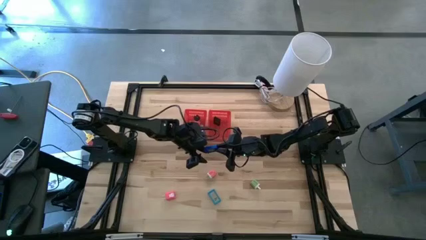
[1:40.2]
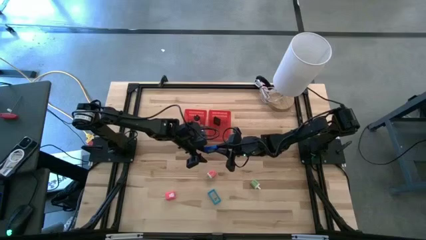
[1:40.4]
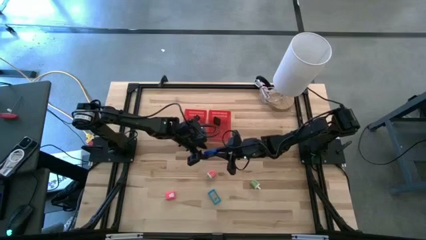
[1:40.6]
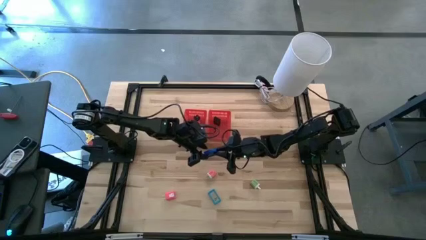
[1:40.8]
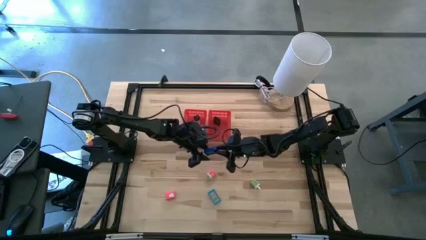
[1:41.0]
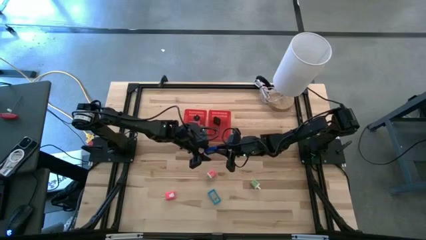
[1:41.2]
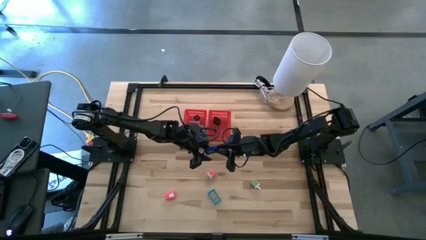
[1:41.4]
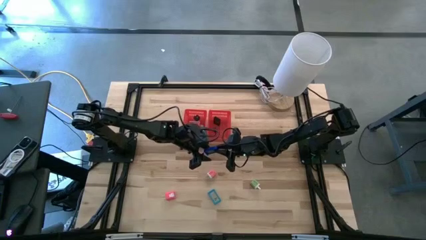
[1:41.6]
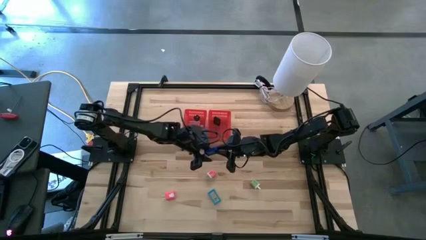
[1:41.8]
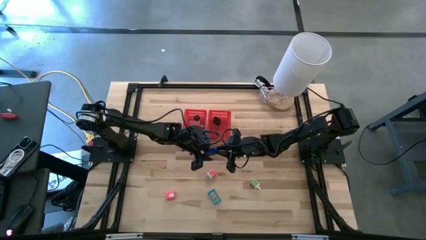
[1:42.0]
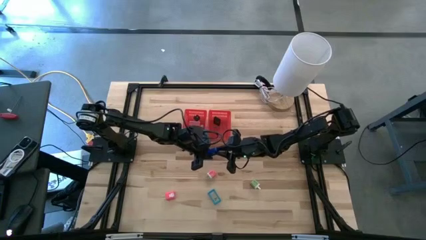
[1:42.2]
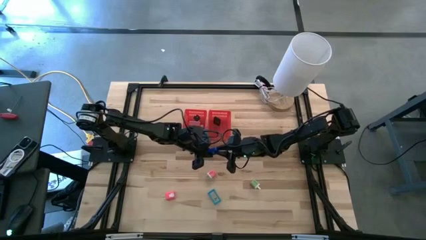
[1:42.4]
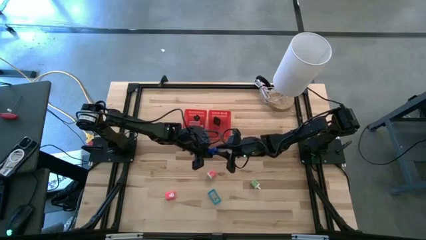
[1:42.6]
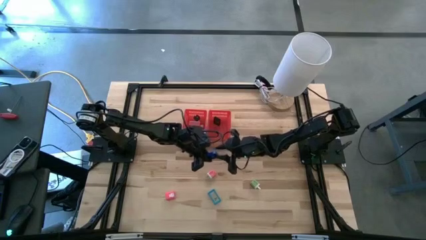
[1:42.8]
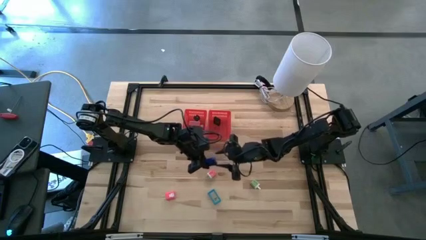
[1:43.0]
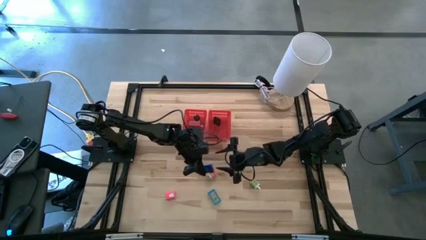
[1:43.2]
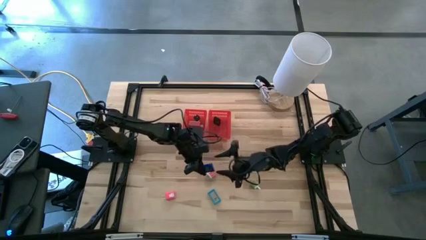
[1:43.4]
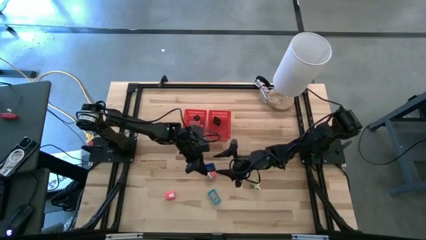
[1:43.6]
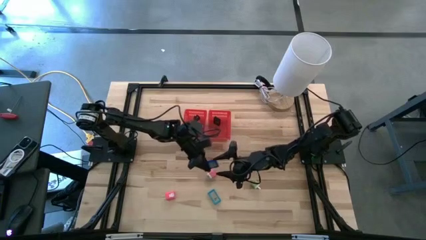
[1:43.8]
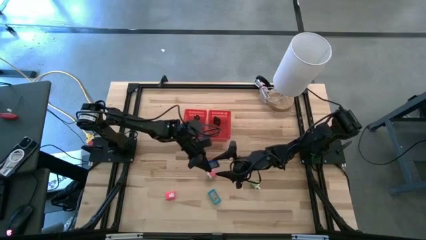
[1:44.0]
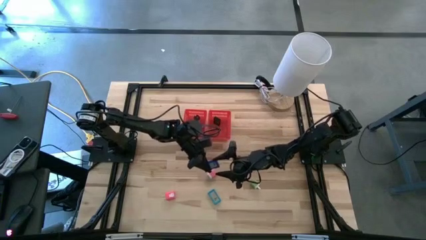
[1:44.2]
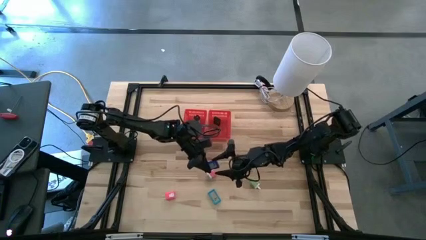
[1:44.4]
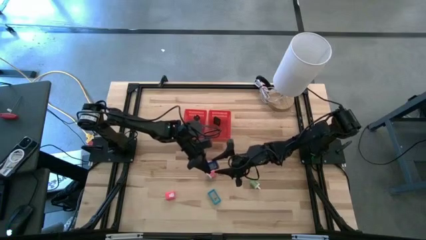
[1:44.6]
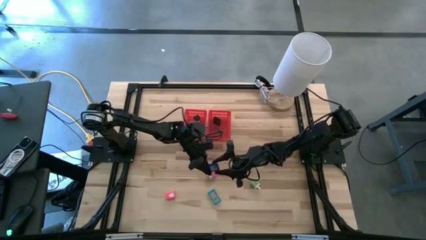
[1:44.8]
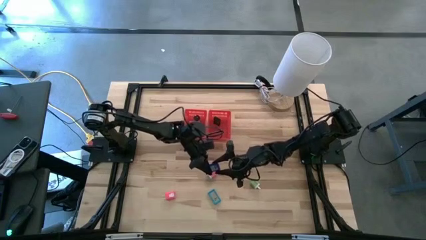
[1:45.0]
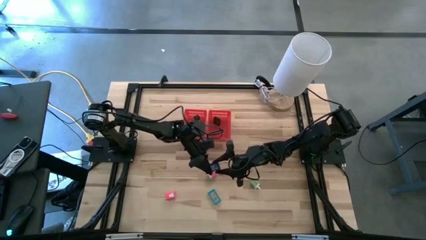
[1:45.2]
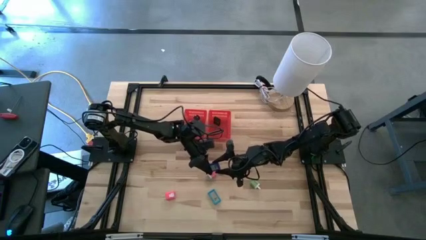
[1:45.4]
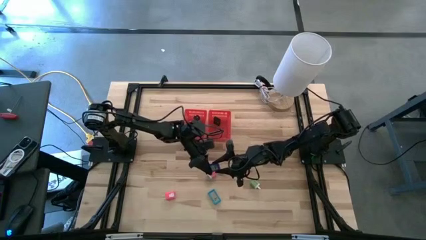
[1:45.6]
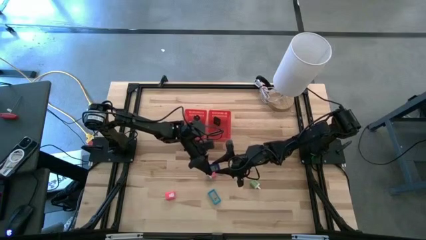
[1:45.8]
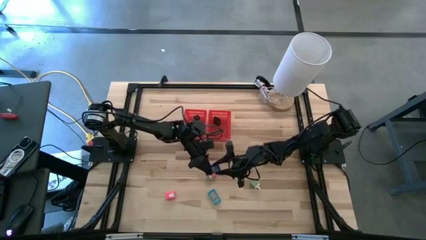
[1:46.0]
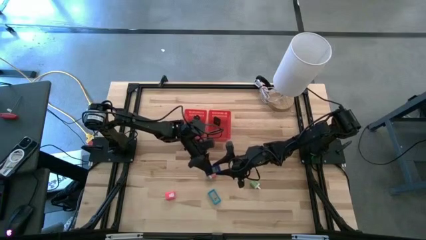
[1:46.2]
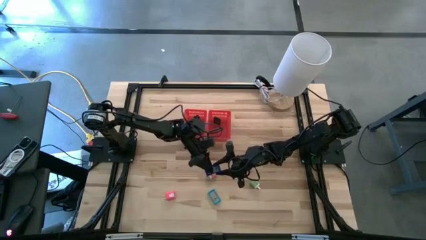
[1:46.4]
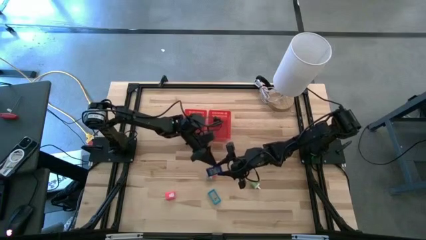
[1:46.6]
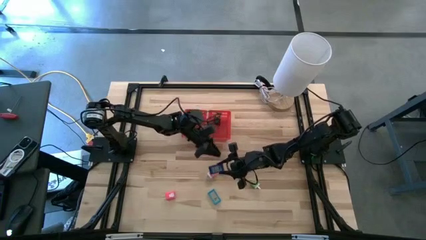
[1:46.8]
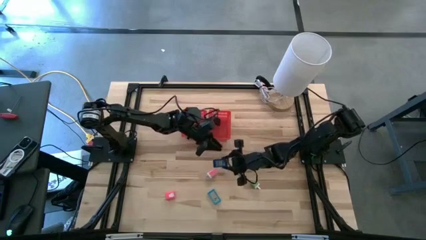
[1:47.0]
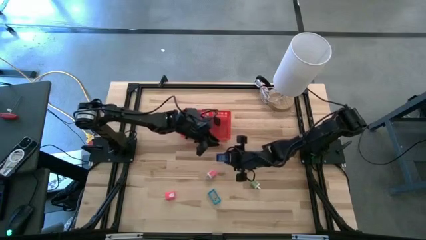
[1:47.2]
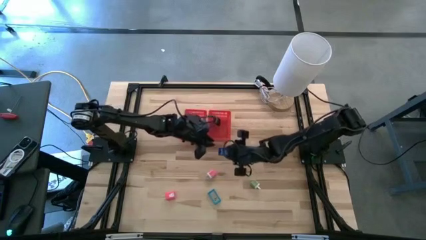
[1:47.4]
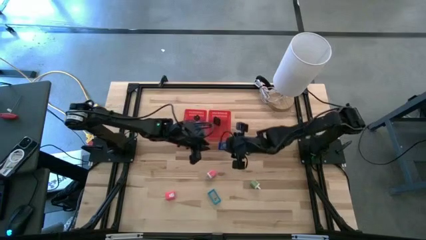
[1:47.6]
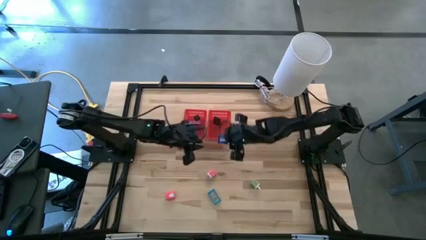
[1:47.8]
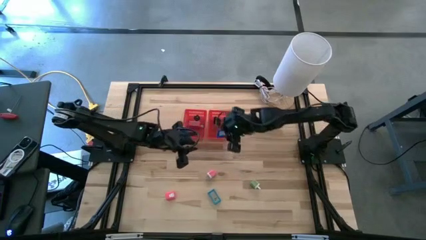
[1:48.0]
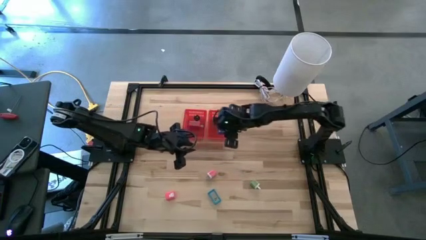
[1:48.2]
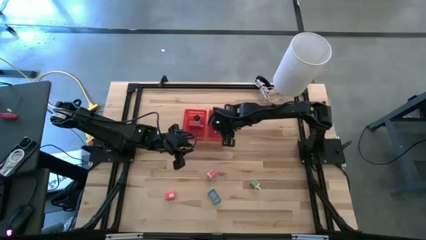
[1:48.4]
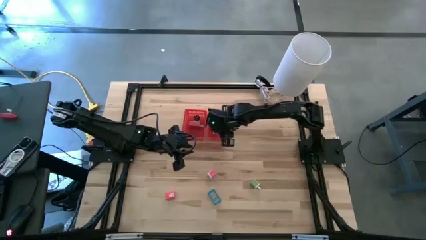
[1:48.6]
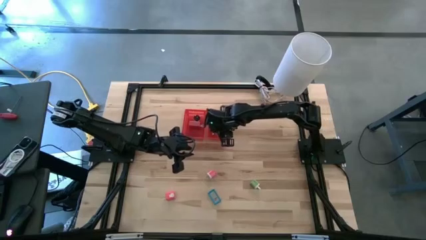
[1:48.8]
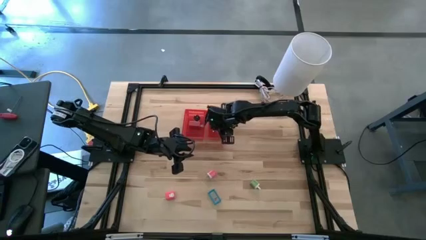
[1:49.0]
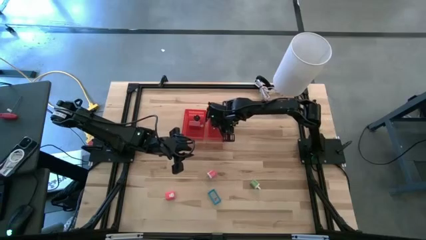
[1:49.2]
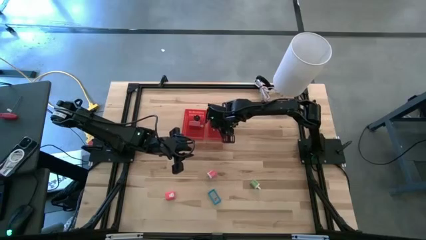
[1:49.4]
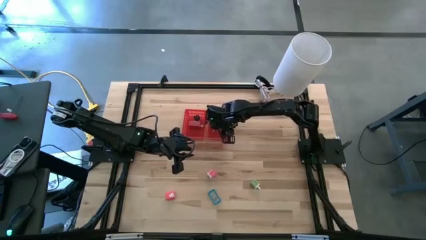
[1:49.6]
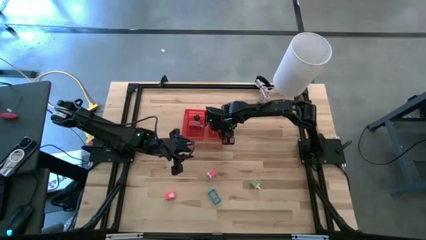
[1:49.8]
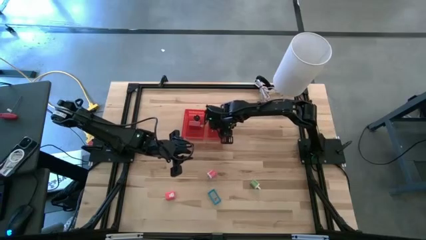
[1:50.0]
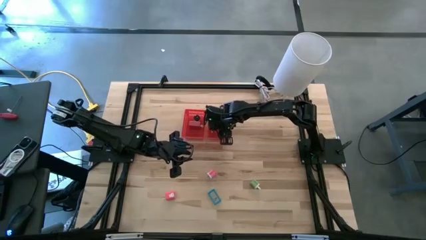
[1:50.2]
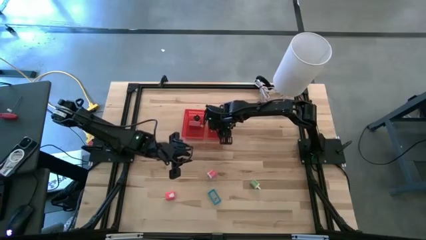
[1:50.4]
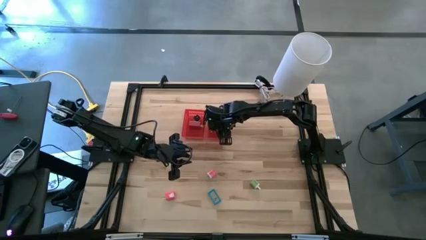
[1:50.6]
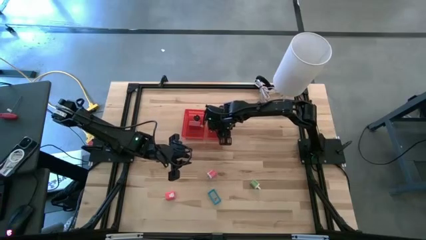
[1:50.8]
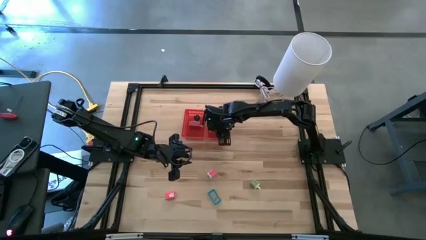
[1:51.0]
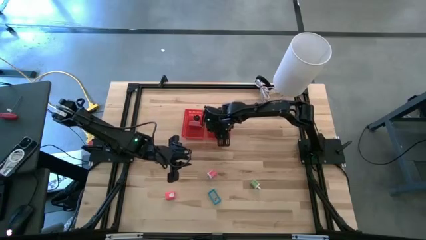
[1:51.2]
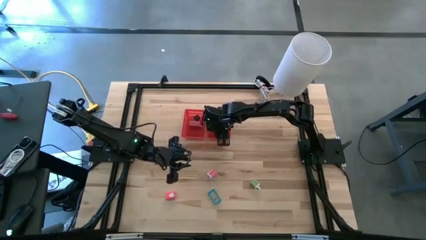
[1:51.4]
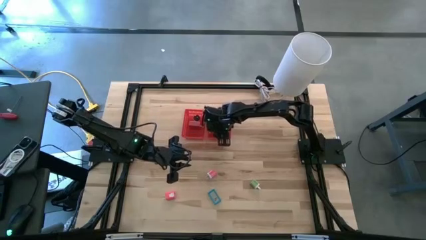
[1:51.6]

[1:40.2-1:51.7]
Task: Pick & Place Office items
Put the dark blue digital clock into the right red bin

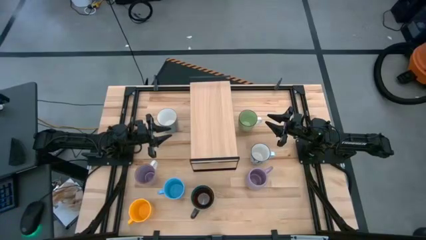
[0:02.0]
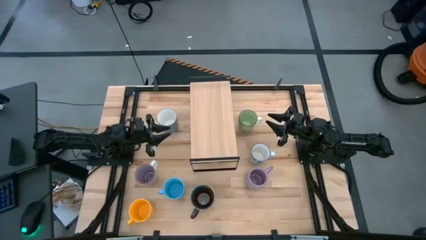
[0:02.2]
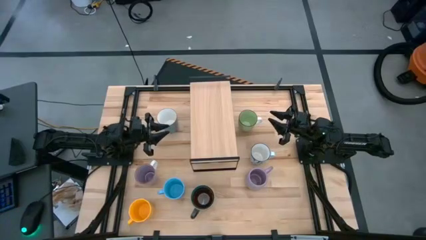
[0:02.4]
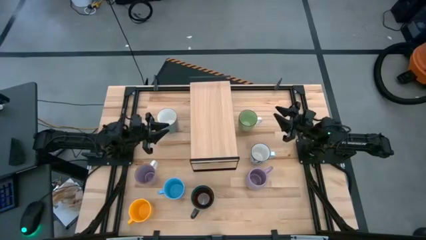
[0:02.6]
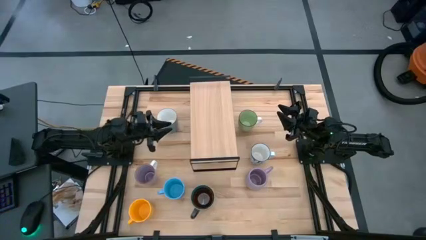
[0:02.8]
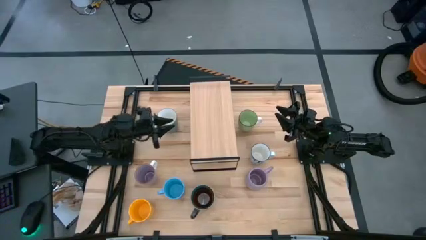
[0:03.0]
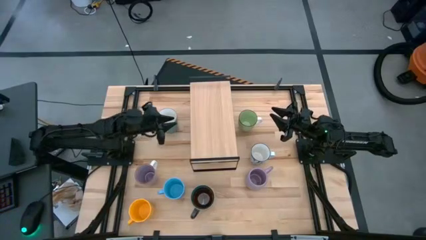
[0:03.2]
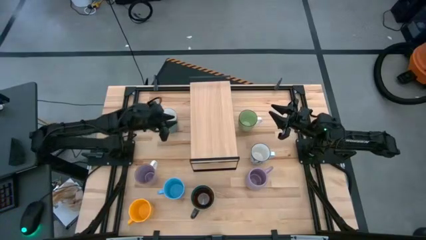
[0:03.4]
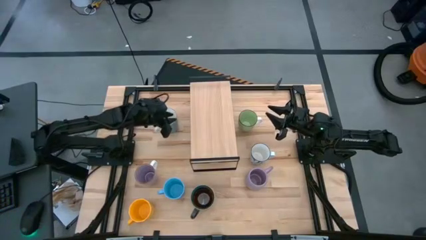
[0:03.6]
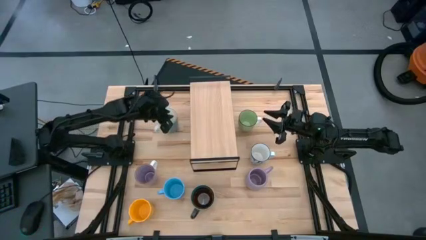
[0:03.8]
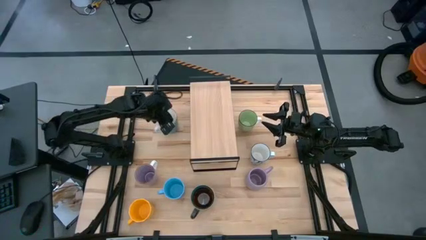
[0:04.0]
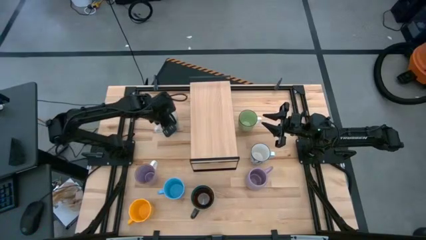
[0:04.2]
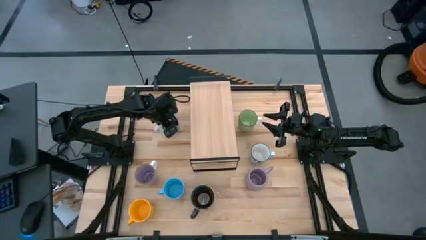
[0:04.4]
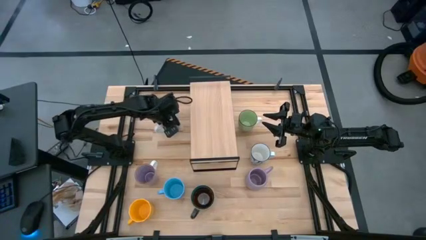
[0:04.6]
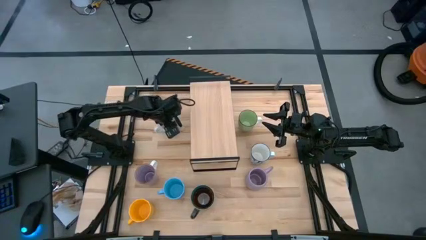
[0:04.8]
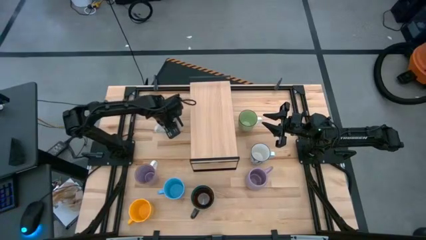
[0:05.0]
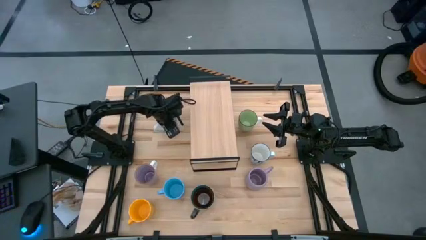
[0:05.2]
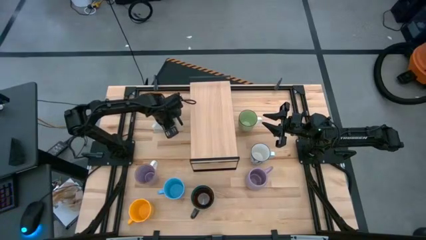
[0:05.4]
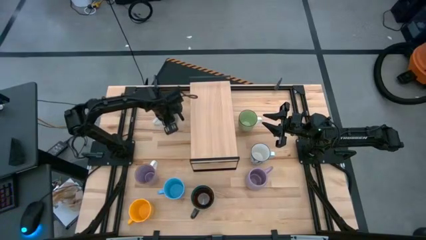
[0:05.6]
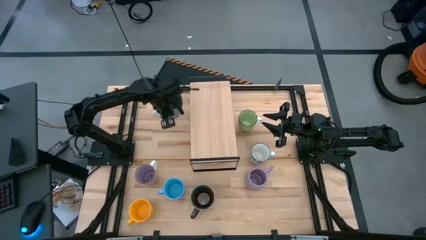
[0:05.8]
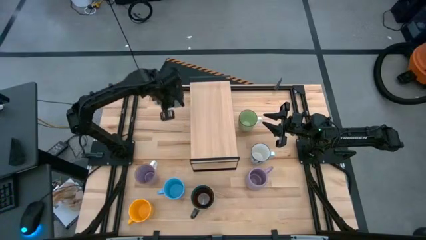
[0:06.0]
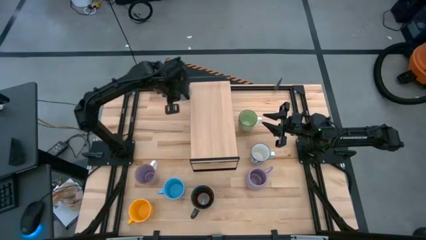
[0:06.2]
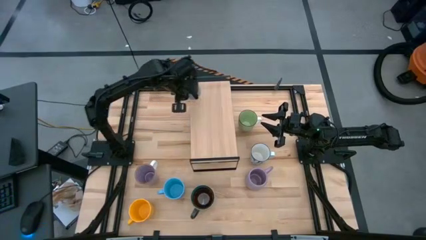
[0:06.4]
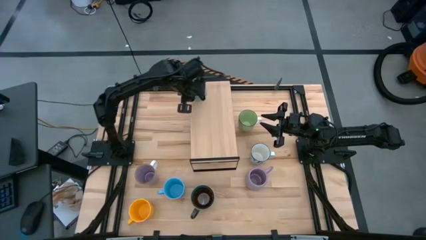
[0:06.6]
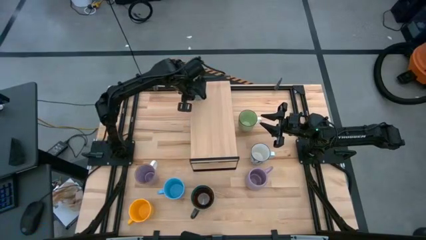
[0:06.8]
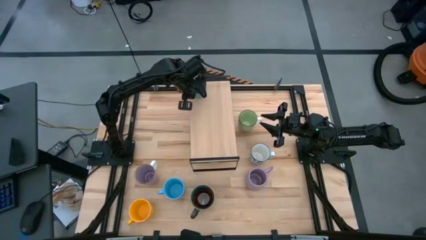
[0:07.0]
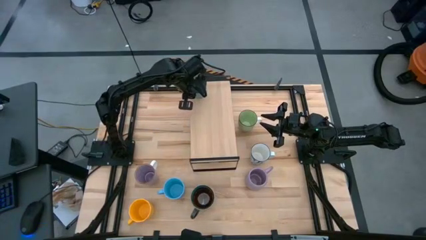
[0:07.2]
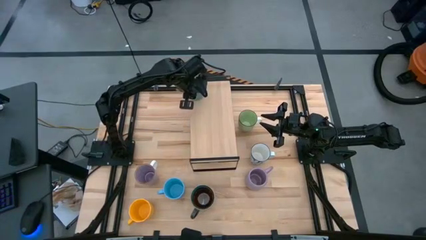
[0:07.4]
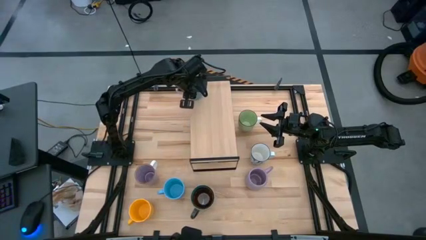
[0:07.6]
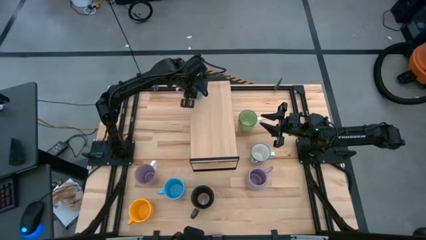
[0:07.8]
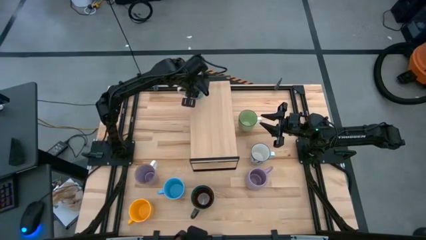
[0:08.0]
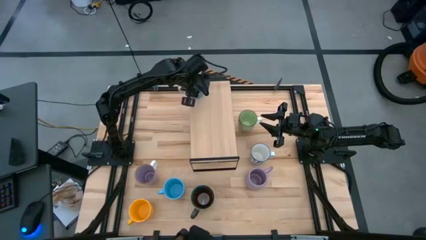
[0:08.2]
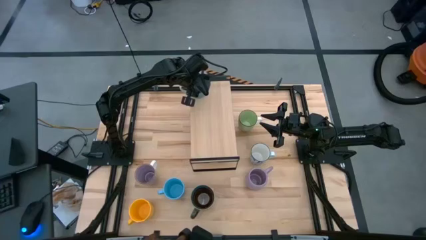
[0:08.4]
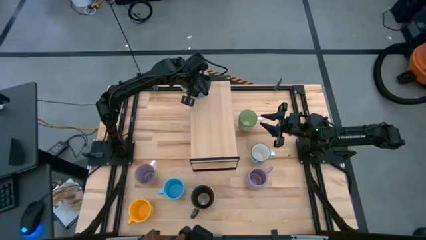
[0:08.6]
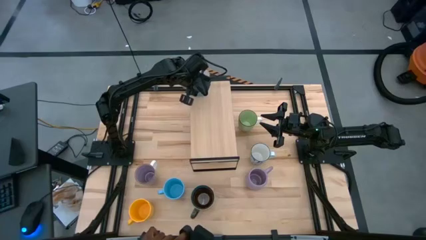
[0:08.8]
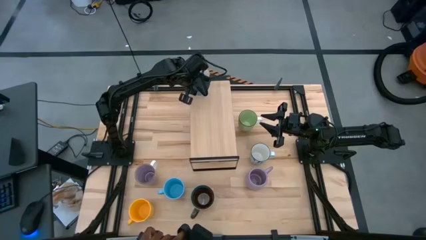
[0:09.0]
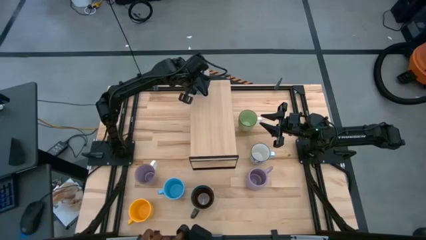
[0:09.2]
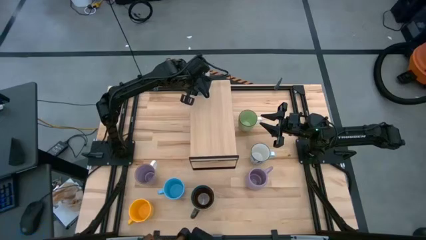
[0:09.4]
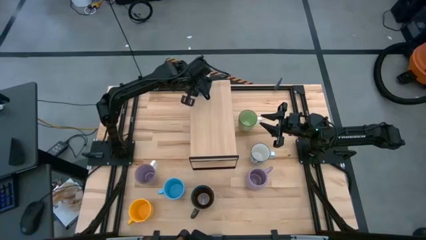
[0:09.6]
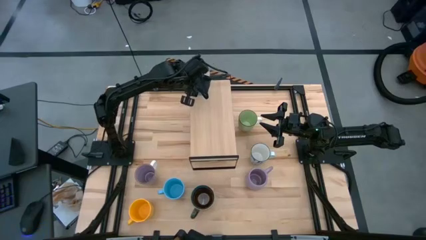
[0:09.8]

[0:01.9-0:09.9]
Task: Place coffee mugs
Put the blue mug on the shelf
